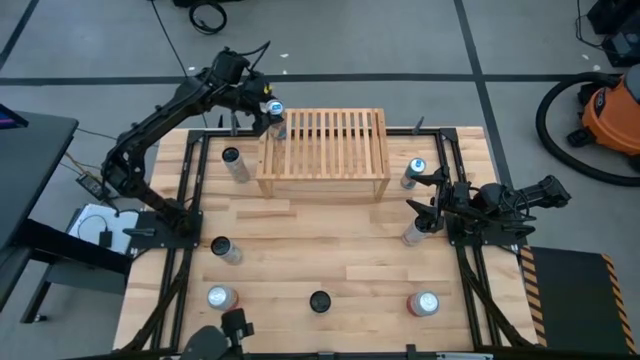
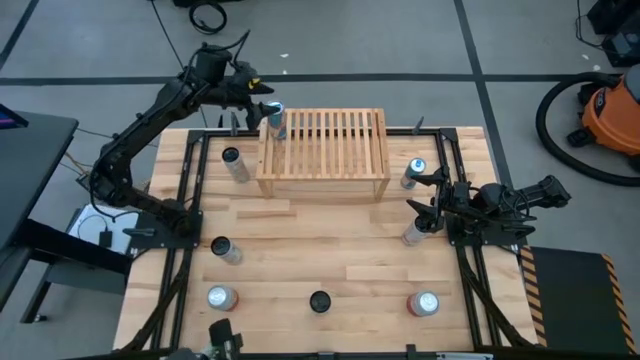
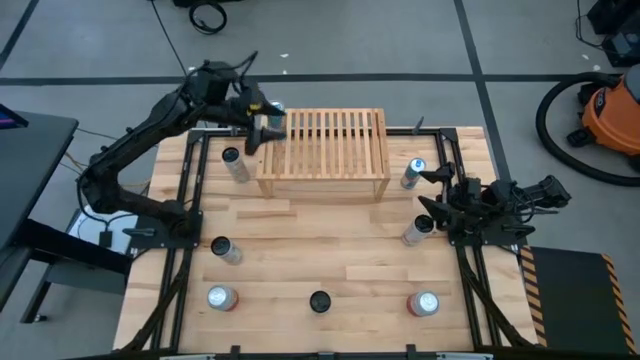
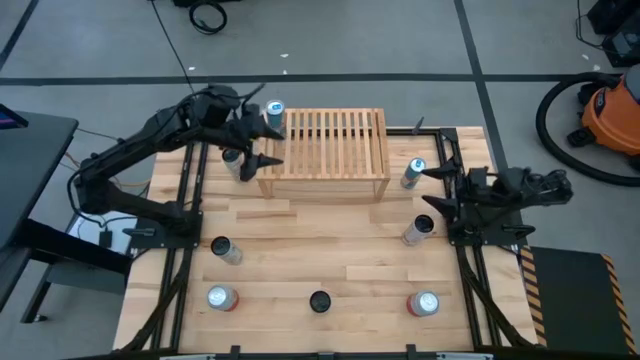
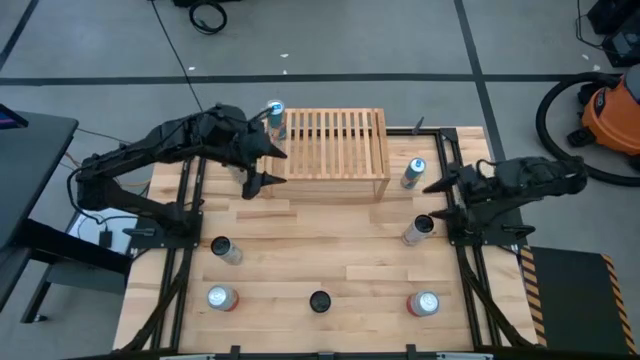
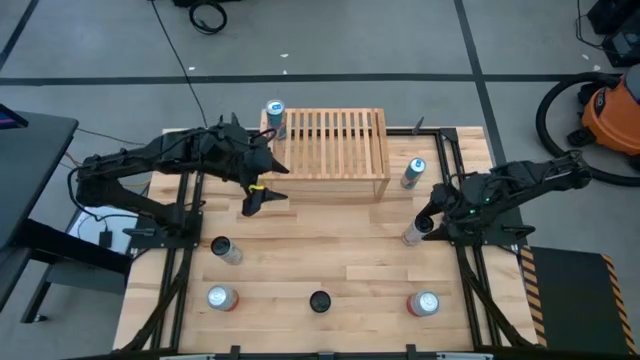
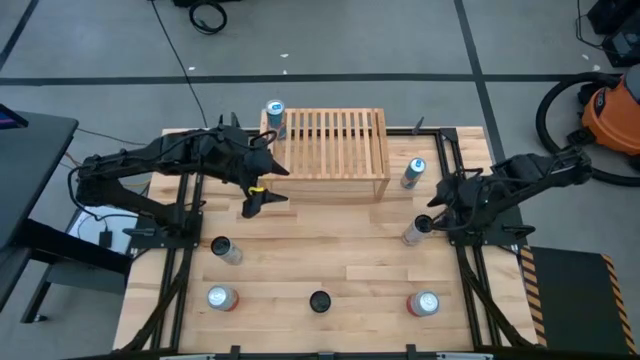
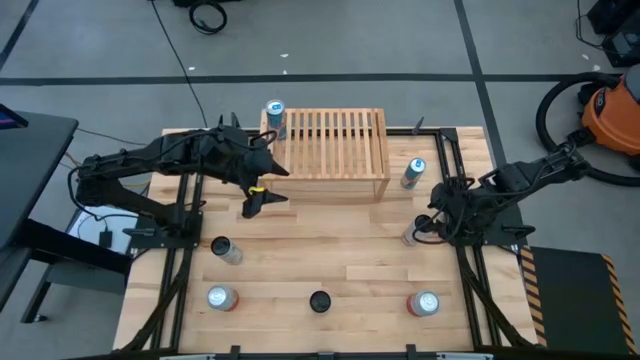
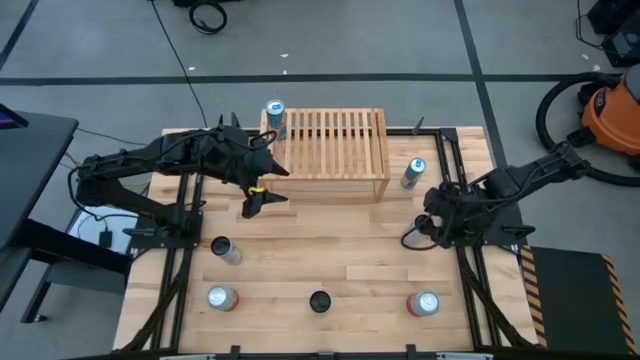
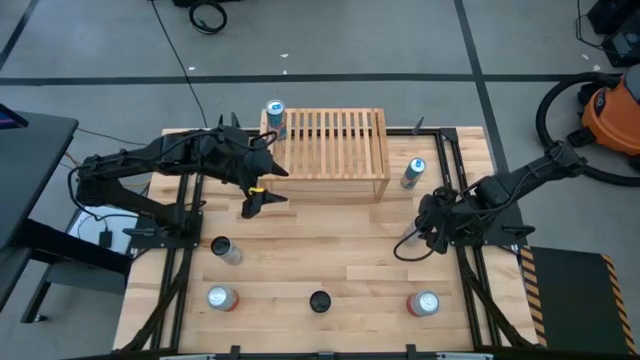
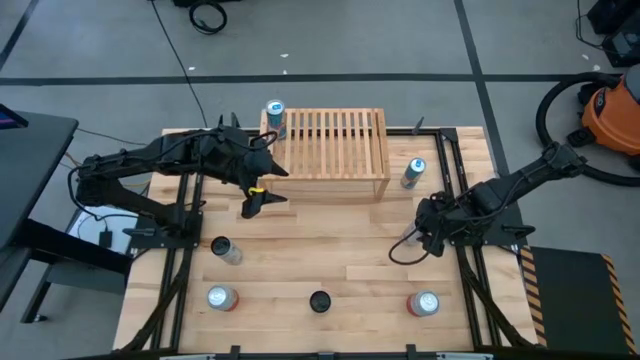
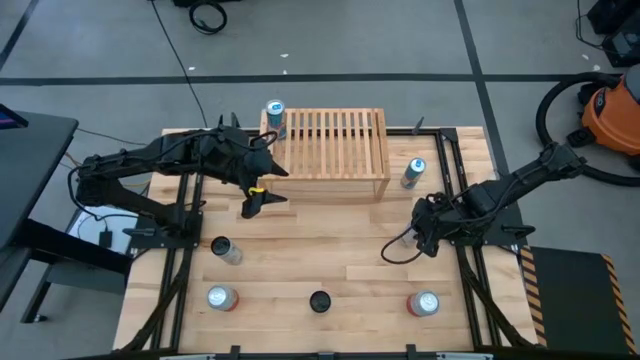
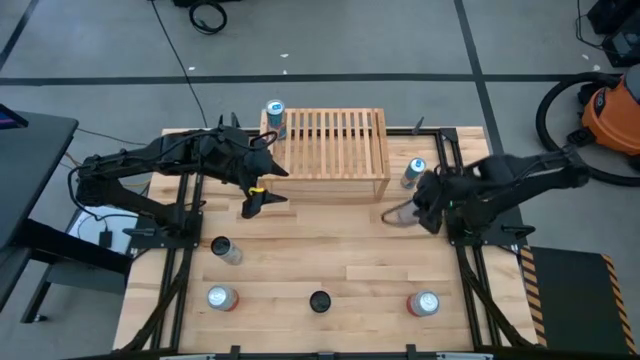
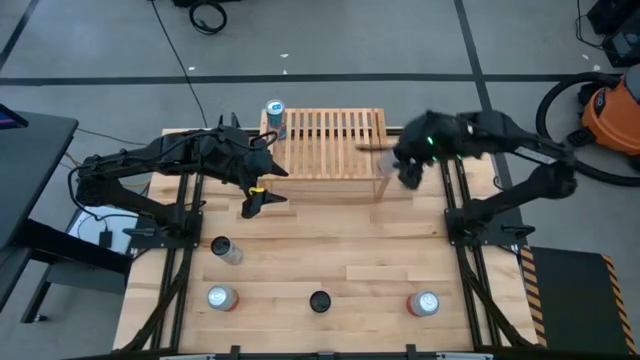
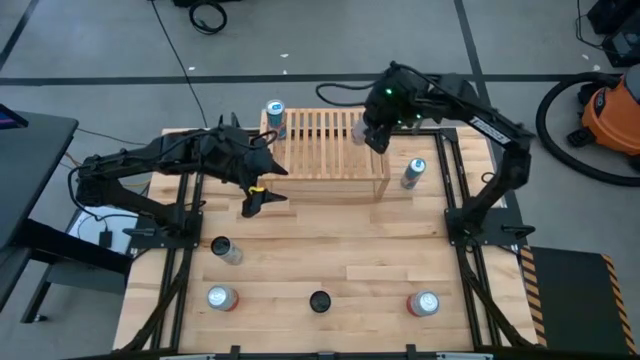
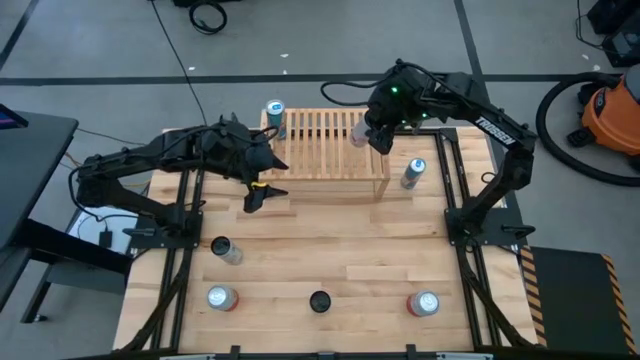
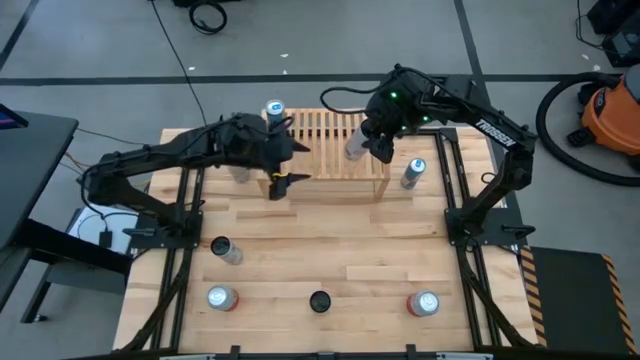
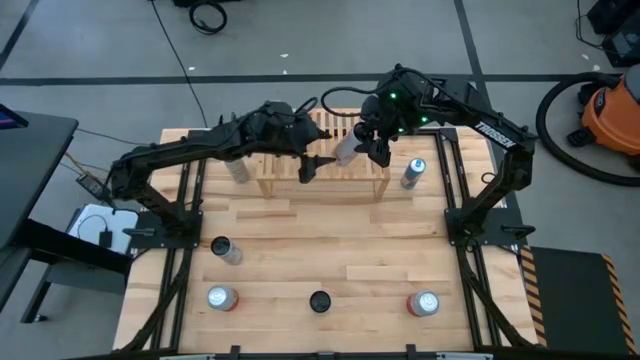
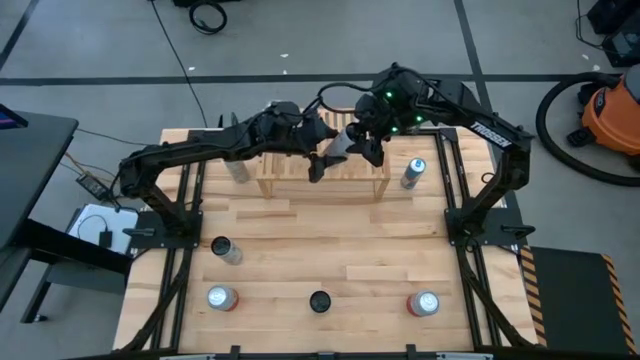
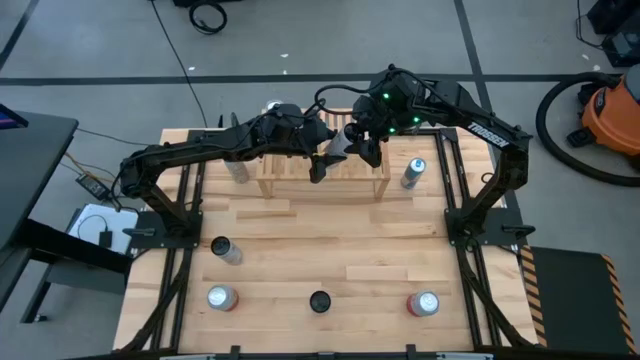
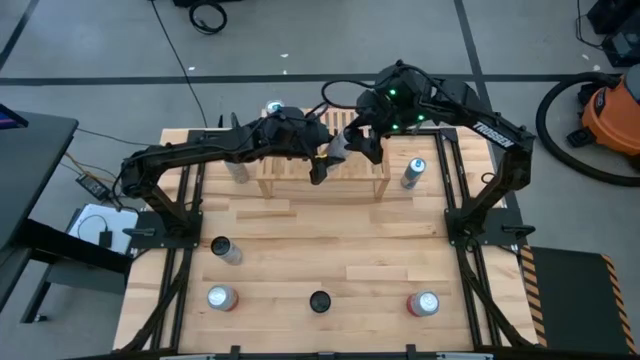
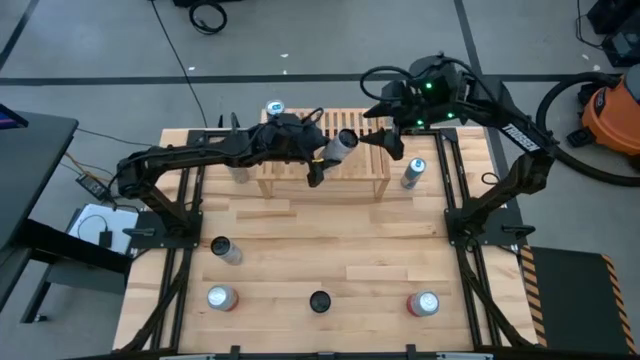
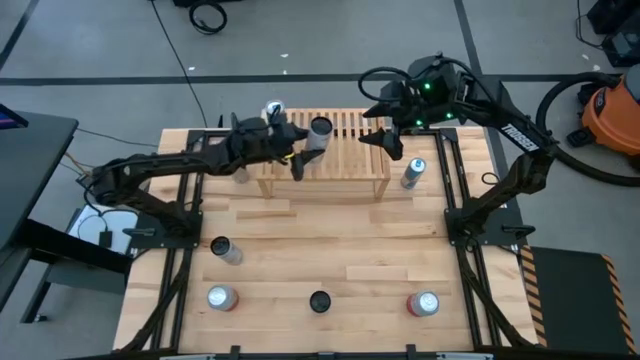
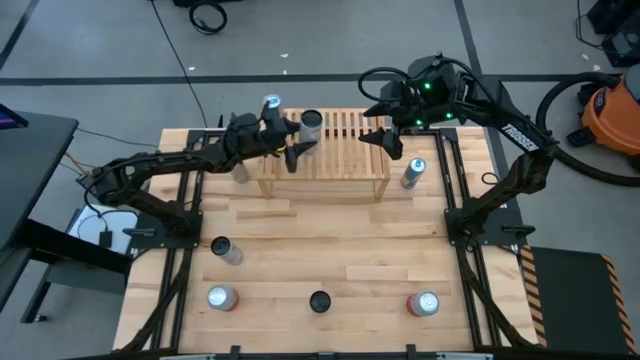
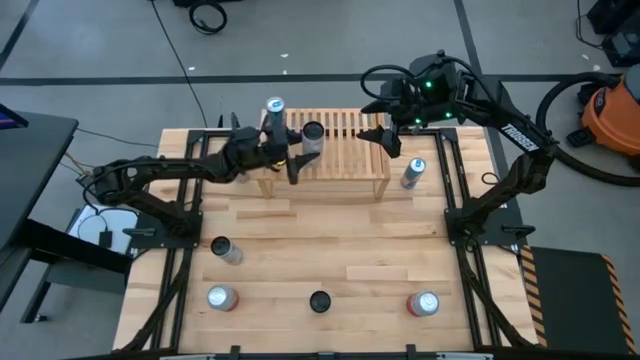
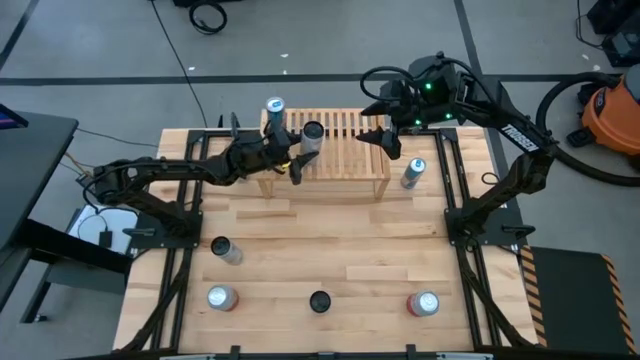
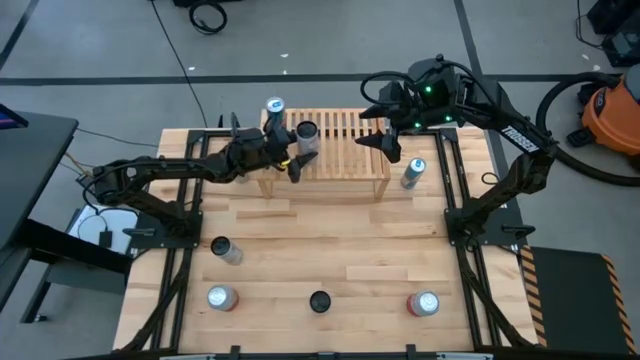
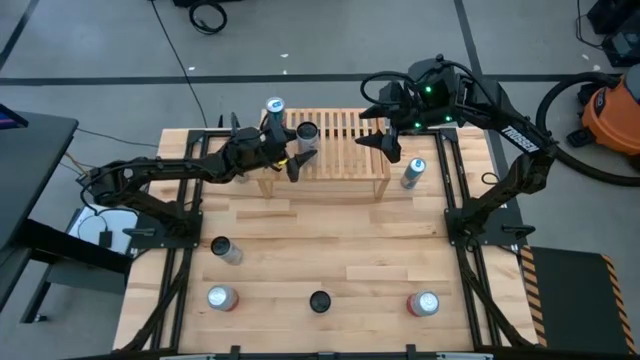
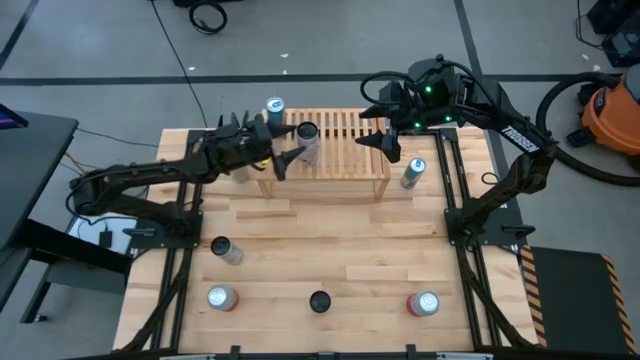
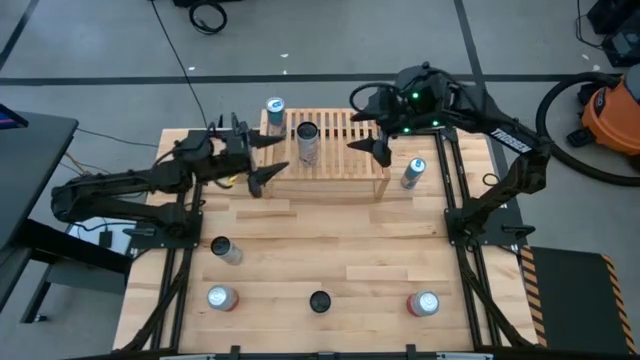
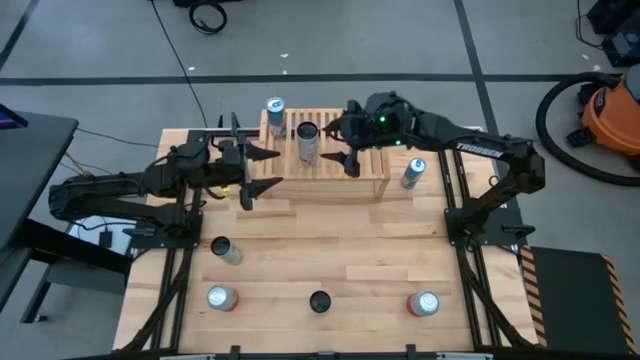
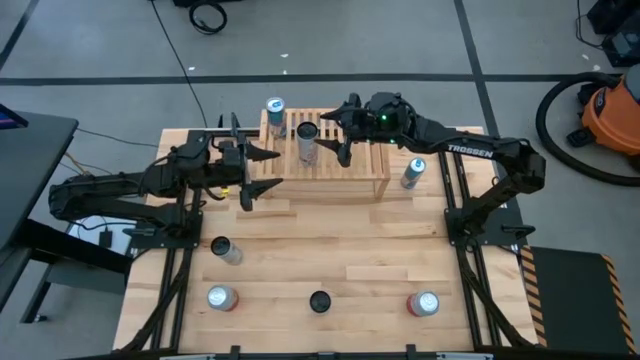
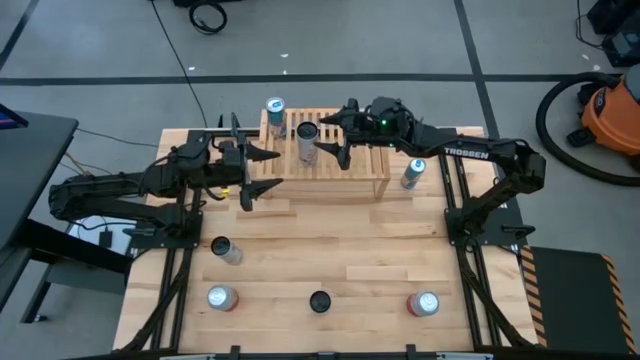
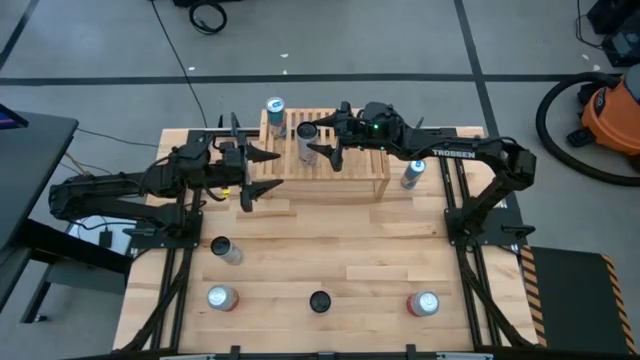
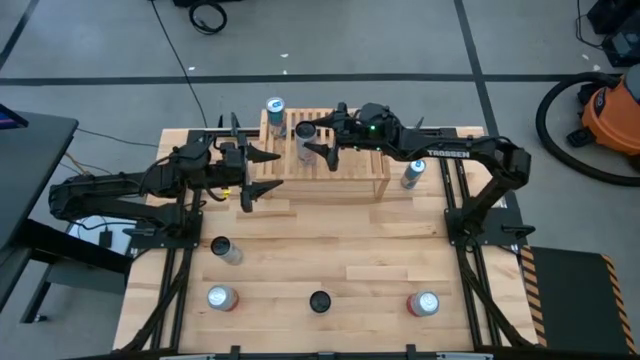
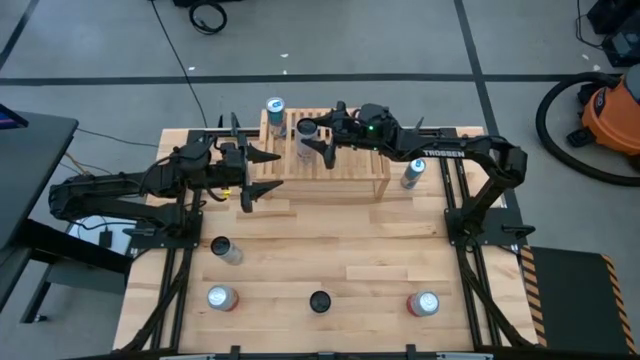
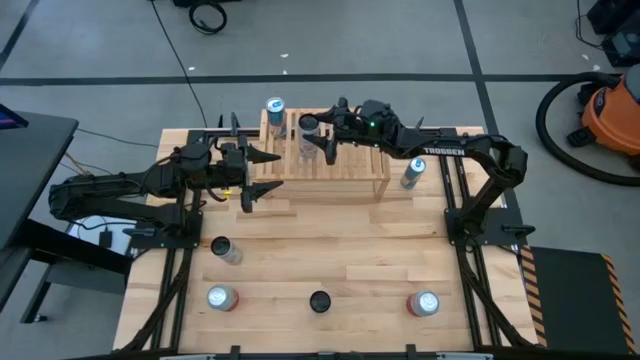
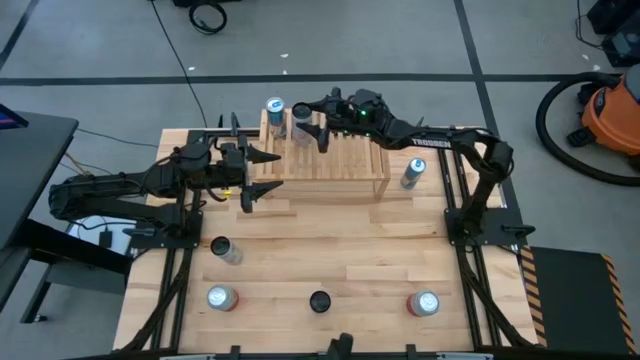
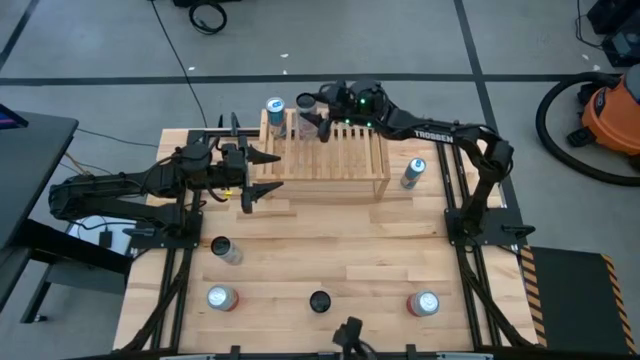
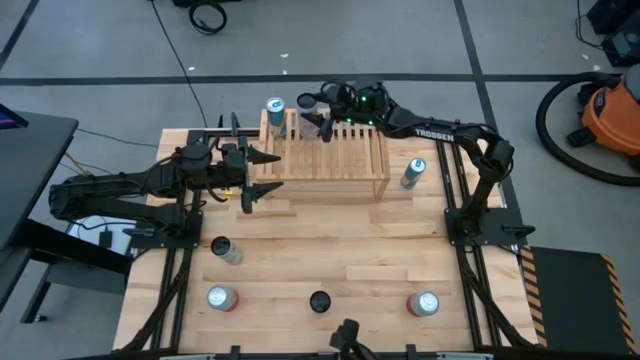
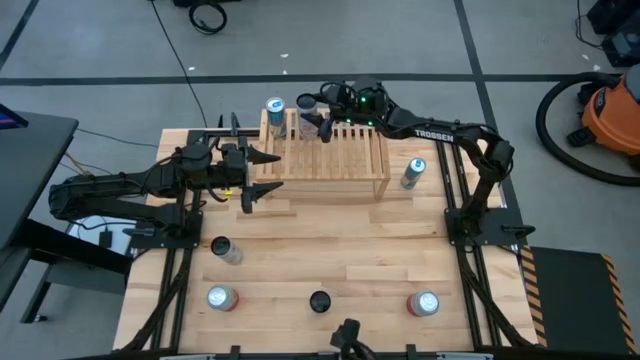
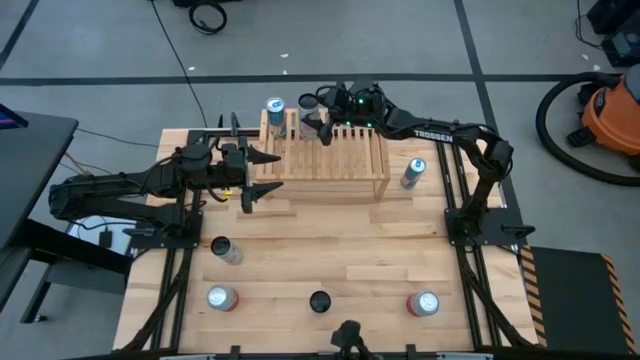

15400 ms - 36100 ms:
Task: Place canned beverage on shelf
Put the right white pink soda can on the shelf
